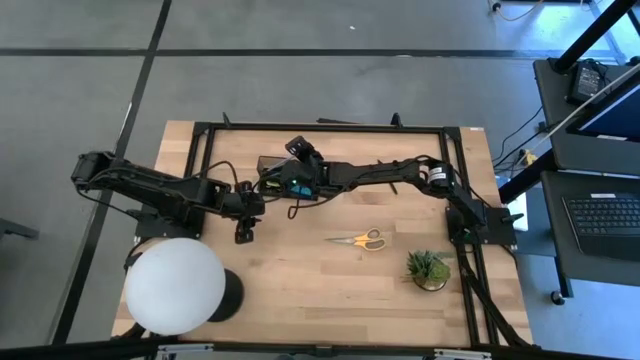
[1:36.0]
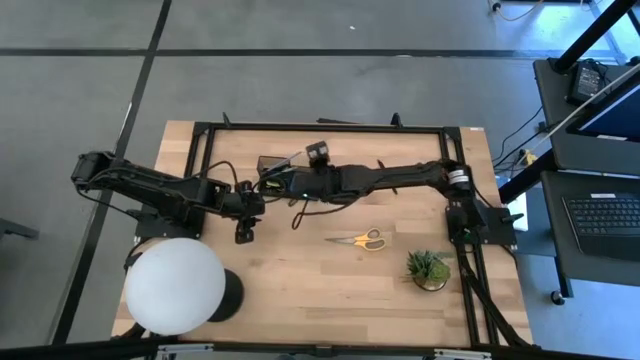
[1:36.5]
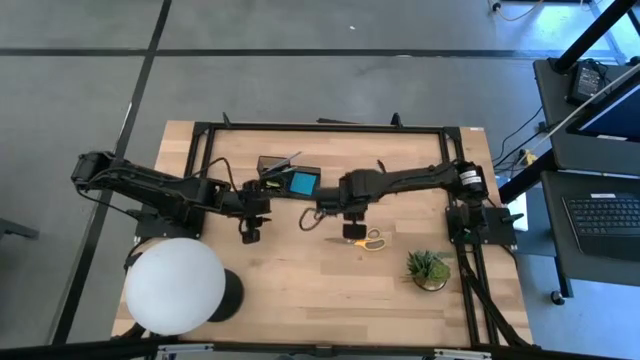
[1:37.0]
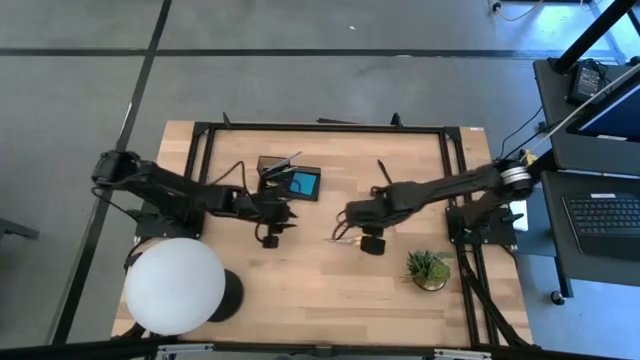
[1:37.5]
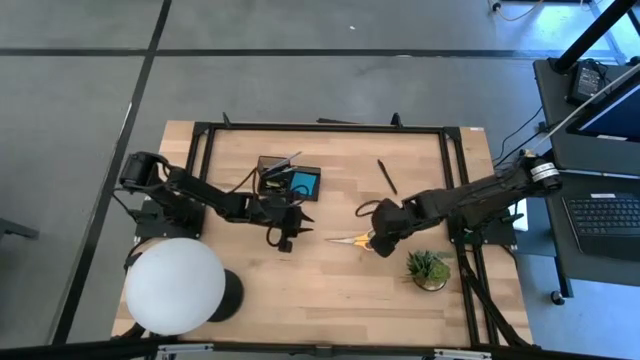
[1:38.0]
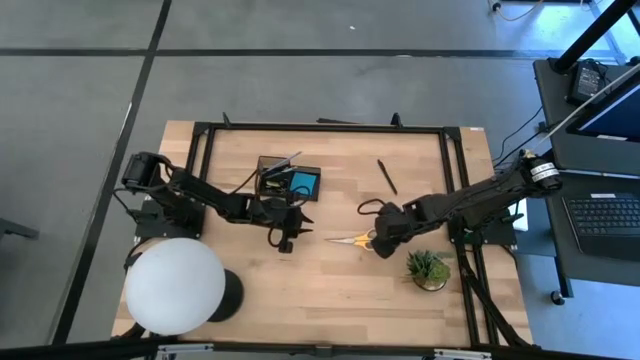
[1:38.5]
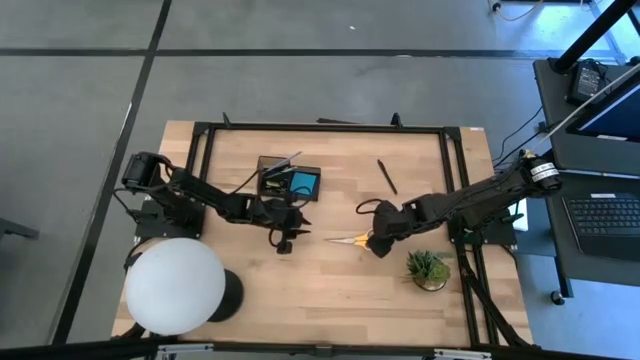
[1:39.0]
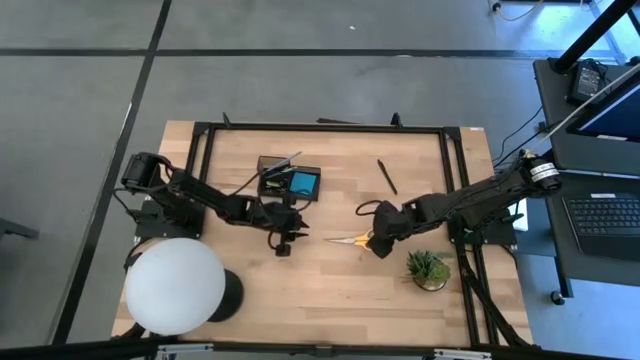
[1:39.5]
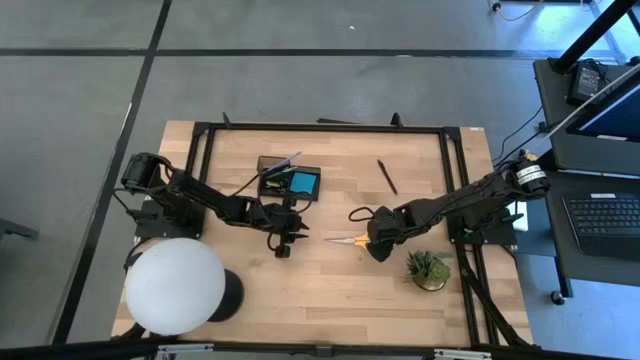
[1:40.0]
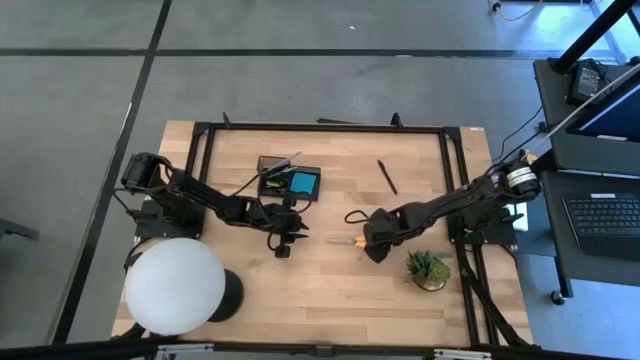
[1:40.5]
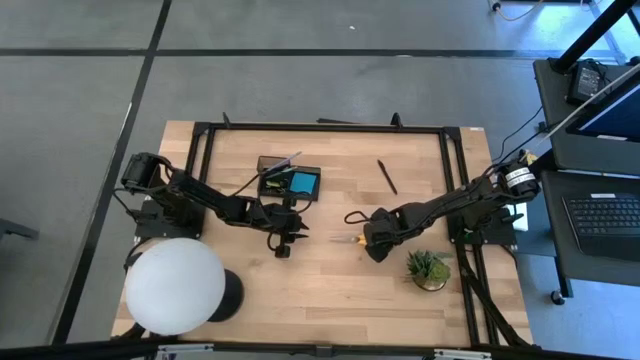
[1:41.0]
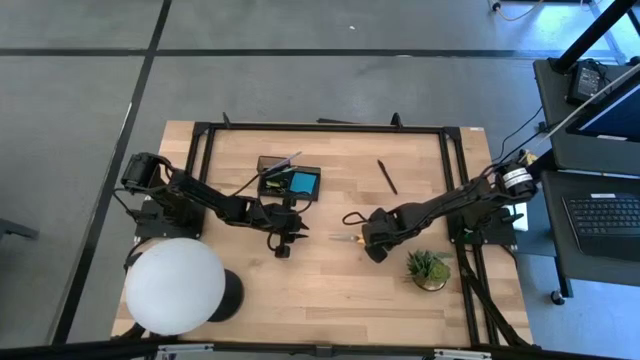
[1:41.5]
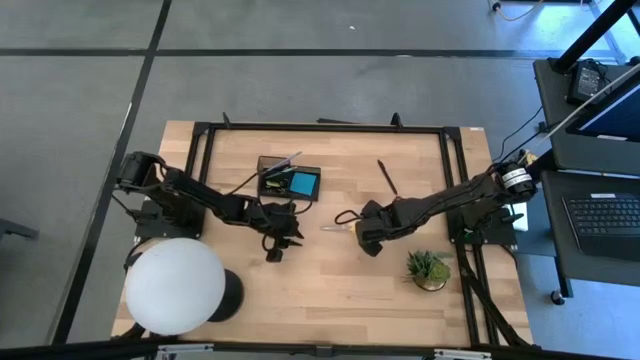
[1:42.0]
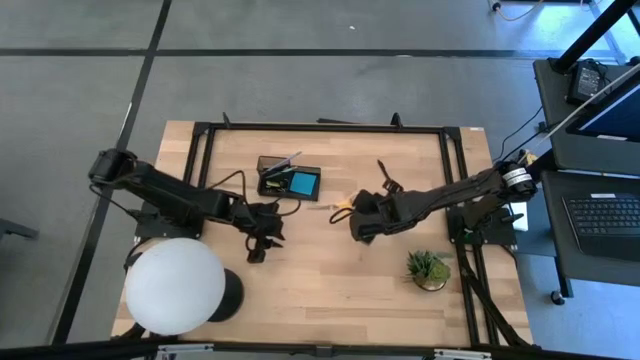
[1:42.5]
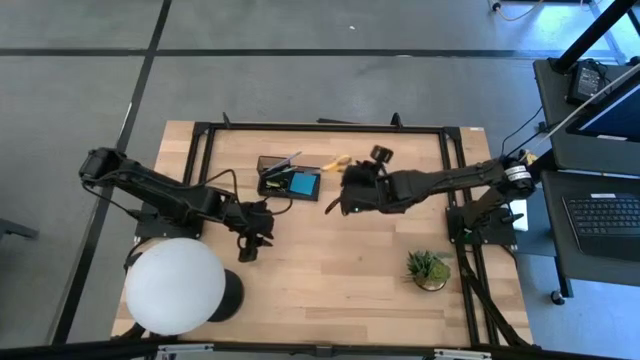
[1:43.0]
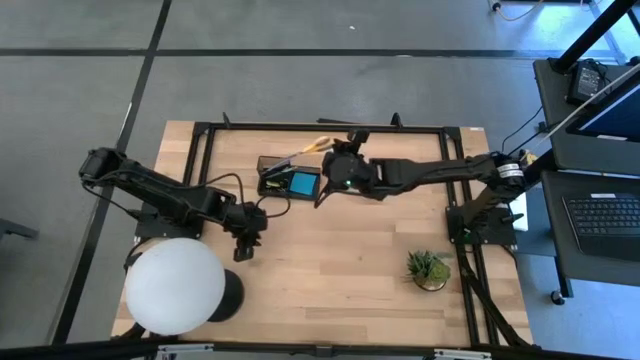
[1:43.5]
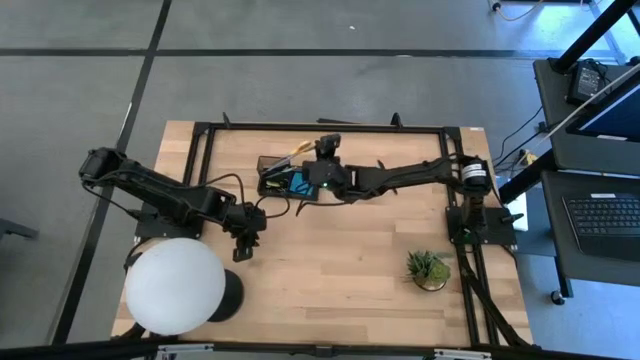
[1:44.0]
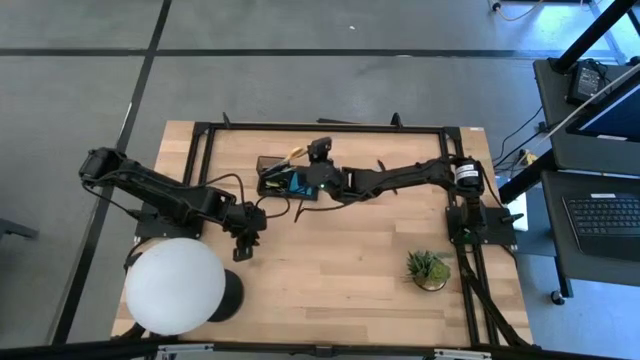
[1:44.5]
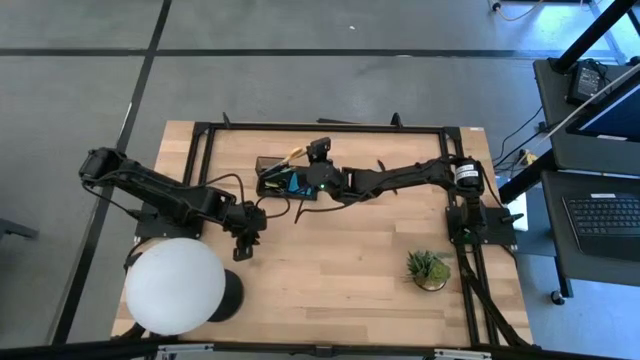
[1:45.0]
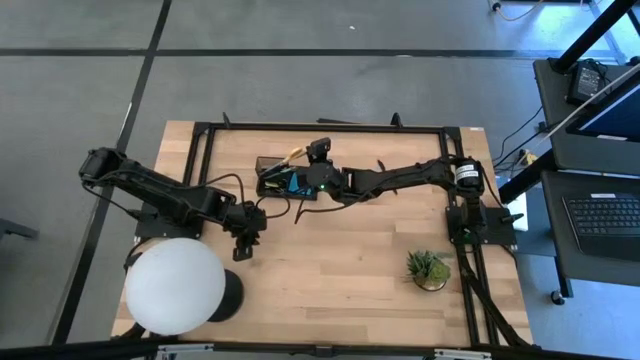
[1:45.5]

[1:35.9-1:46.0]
Task: Pick and place office supplies into organizer
Put the yellow scissors into the black desk organizer

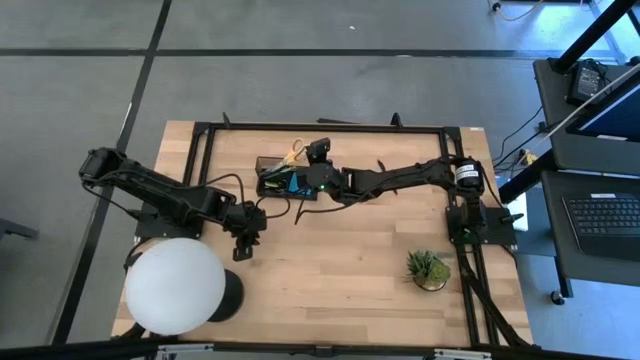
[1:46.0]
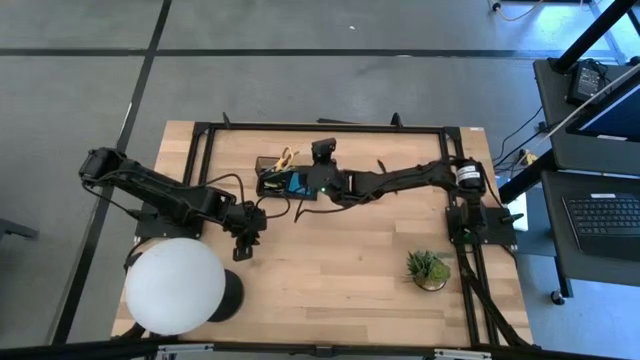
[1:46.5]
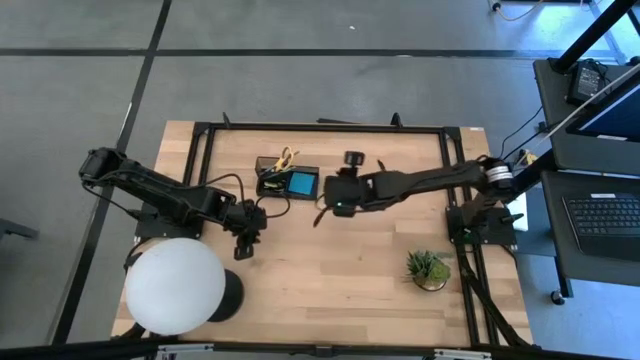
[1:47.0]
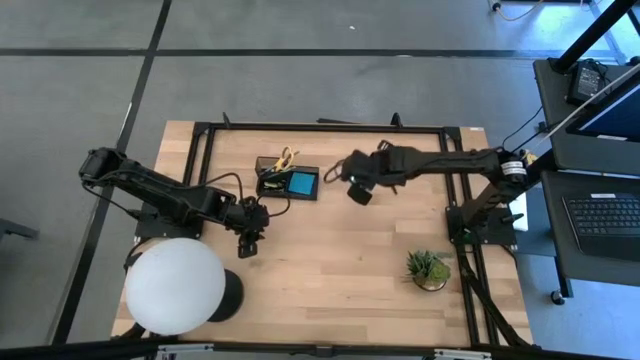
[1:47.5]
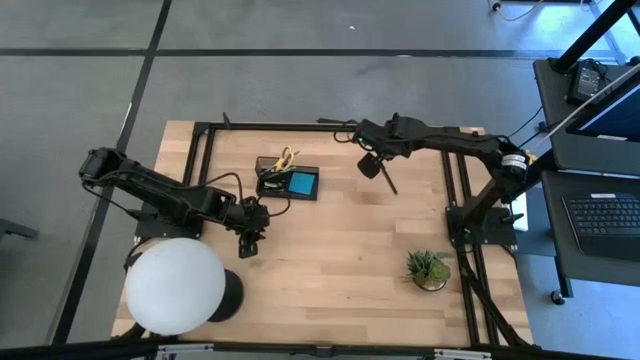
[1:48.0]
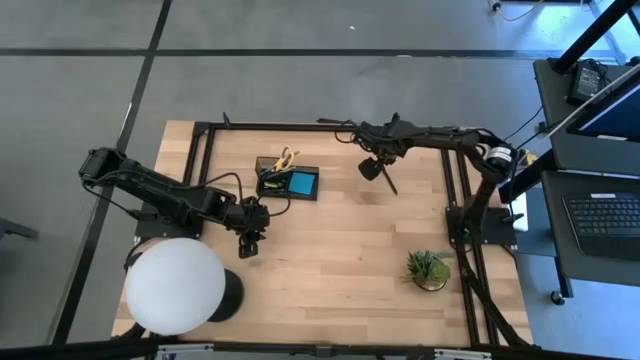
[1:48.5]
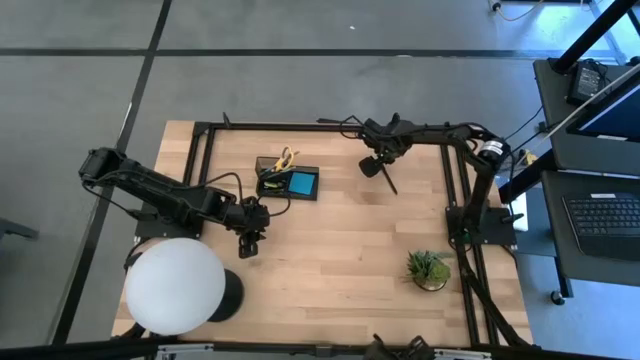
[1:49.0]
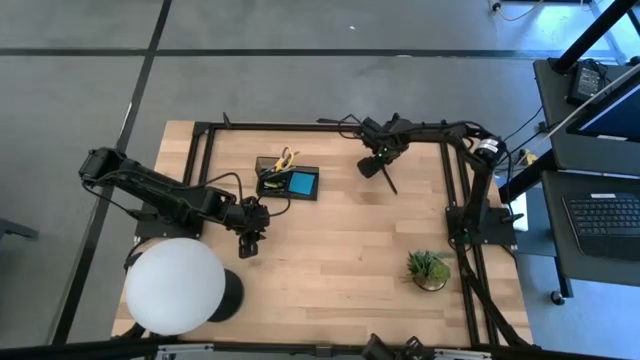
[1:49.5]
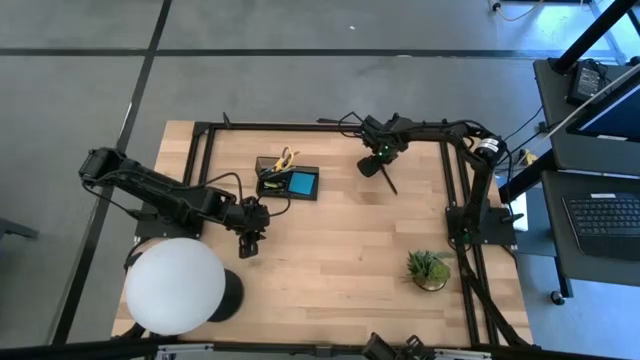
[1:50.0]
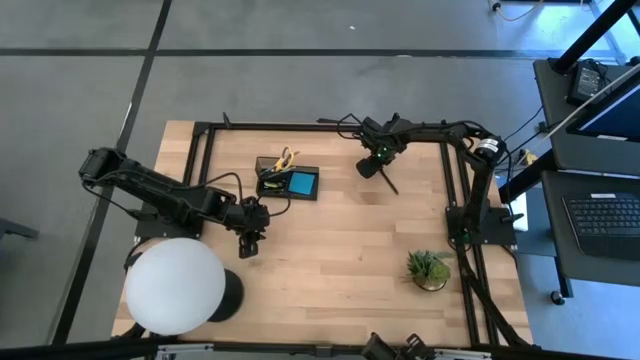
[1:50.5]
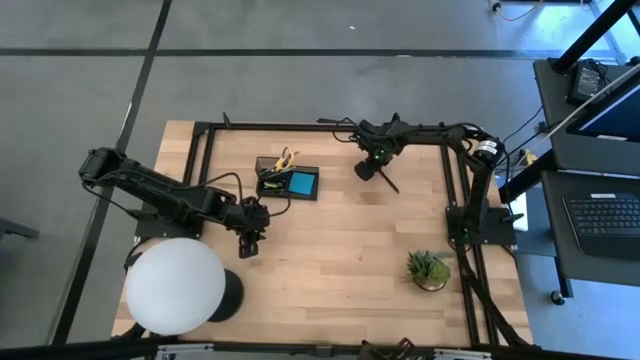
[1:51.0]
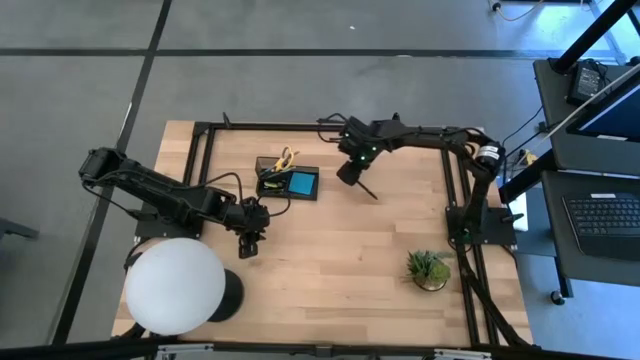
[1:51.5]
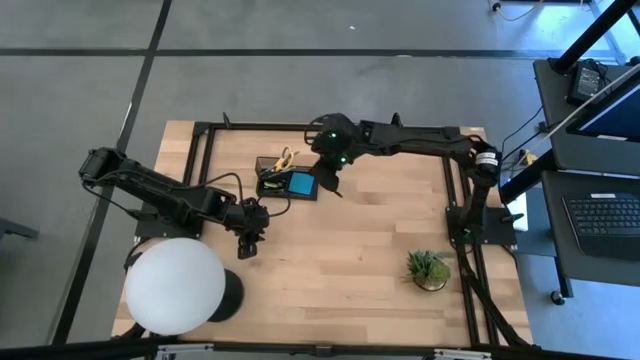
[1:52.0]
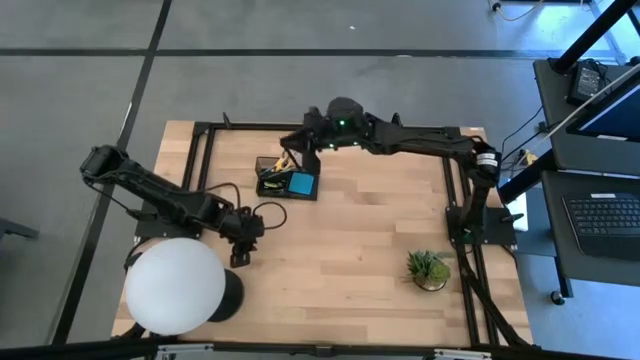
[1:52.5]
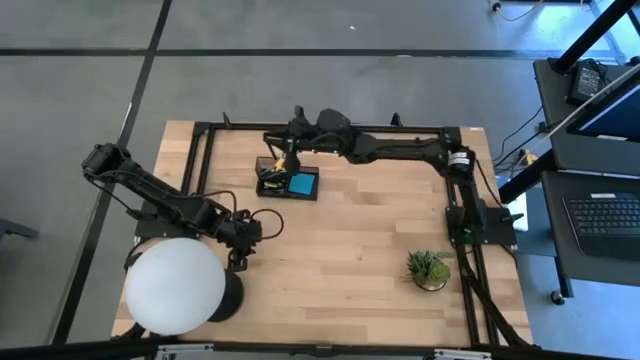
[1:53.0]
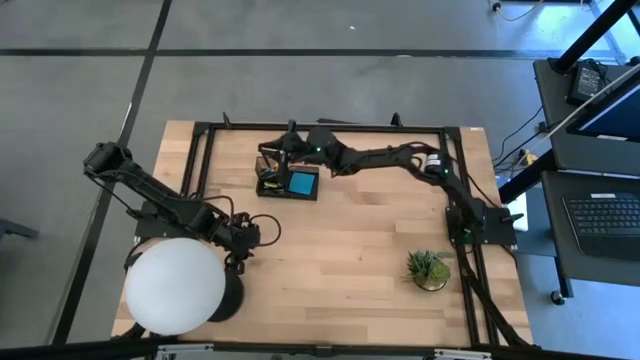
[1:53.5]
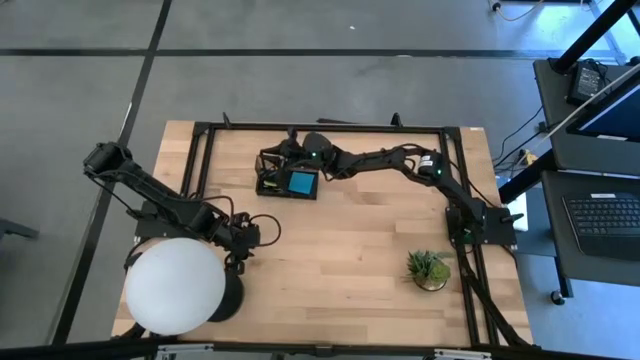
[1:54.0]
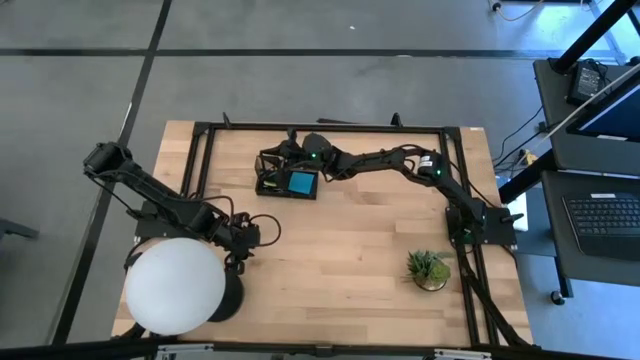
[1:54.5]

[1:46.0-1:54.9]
Put the black pen into the black desk organizer

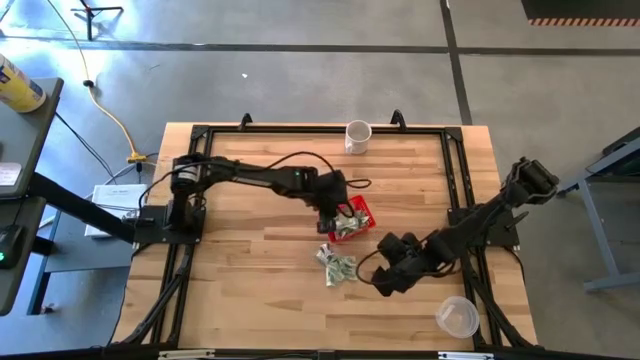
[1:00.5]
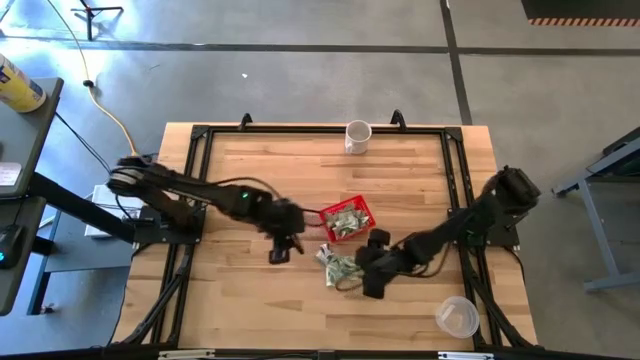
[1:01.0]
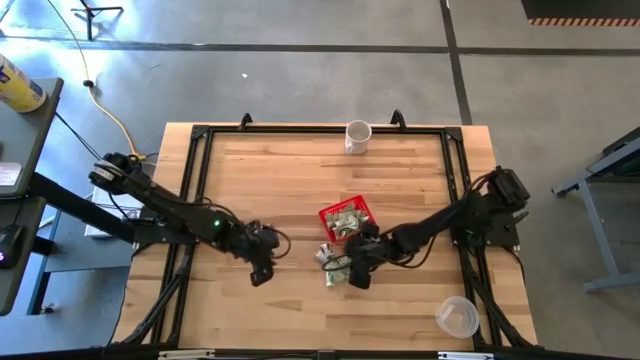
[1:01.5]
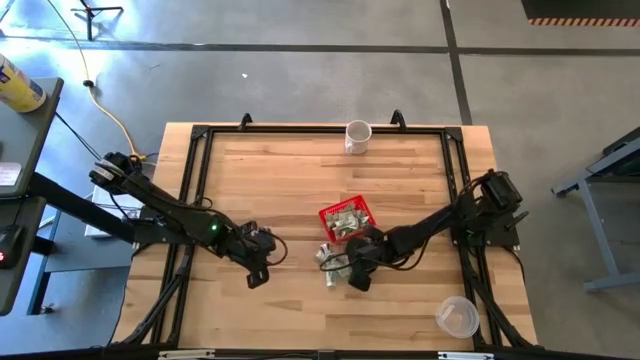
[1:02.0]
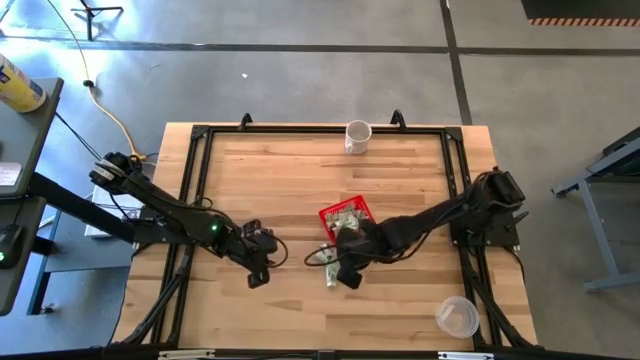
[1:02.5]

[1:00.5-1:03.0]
Task: Pick and place items into bin
Put the white stevia packet into the red bin

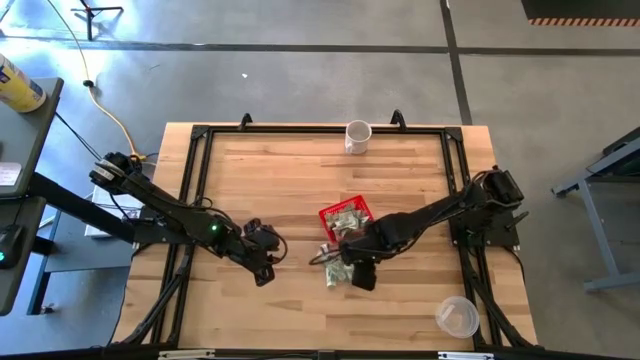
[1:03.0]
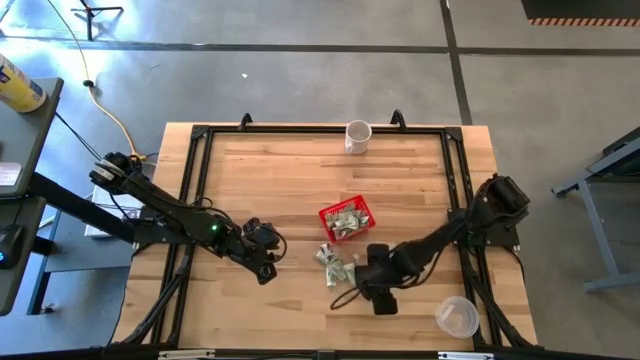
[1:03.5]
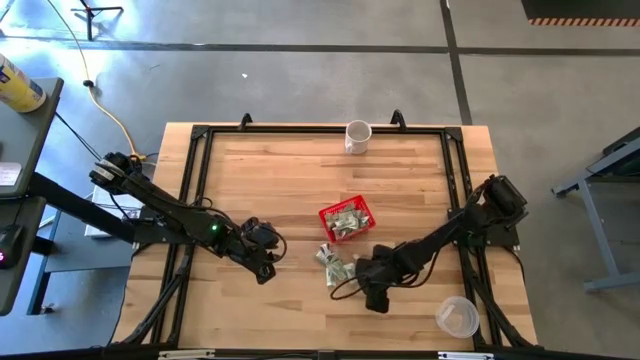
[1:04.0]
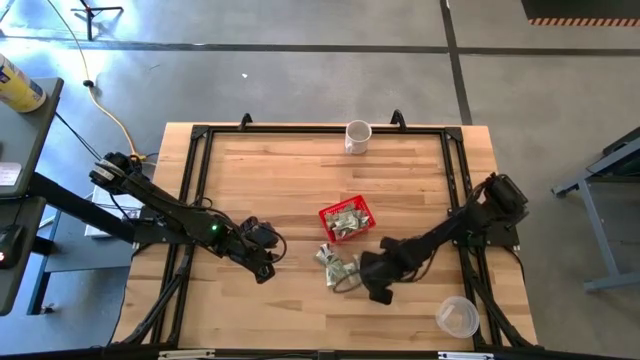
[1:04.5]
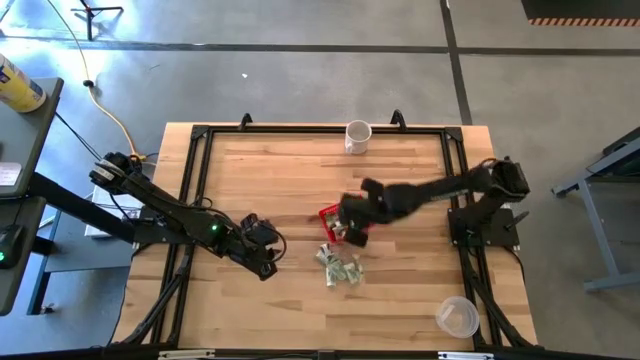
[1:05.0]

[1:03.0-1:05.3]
Put the white stevia packet into the red bin
